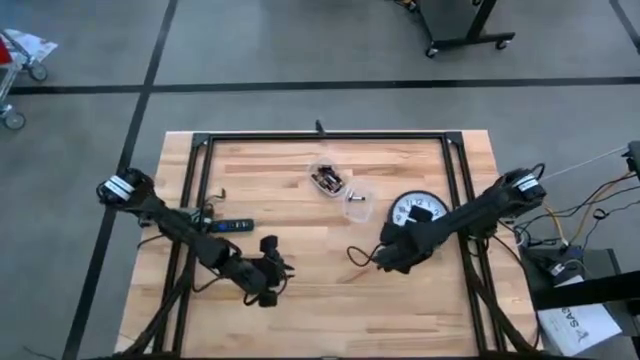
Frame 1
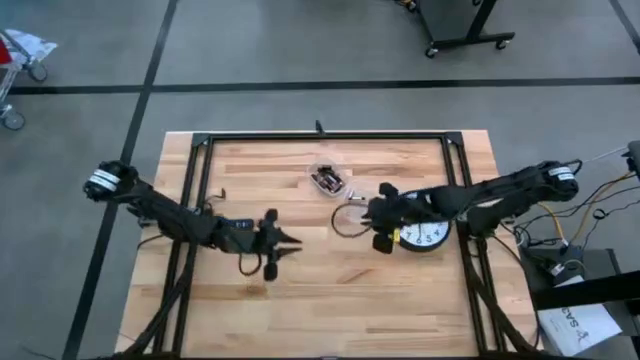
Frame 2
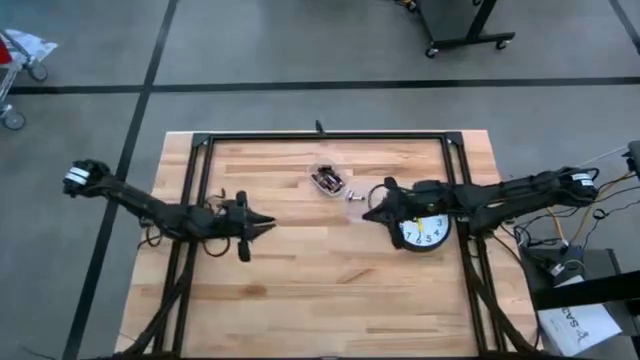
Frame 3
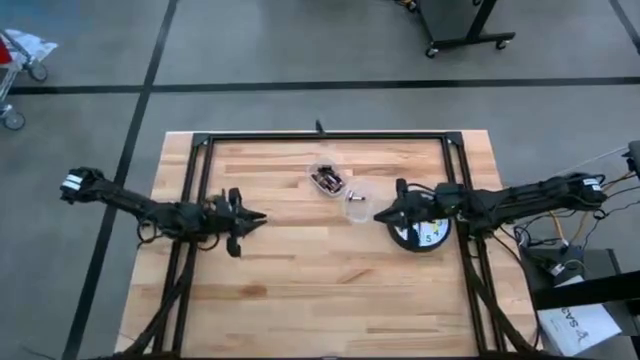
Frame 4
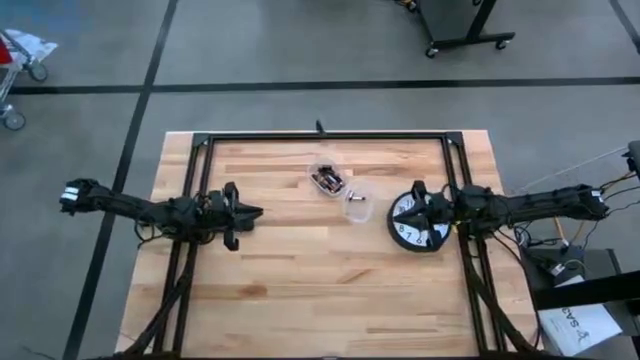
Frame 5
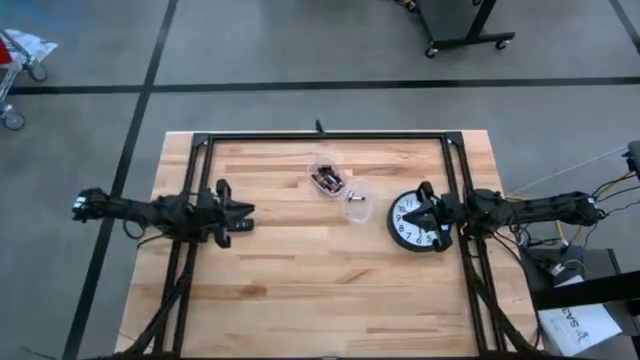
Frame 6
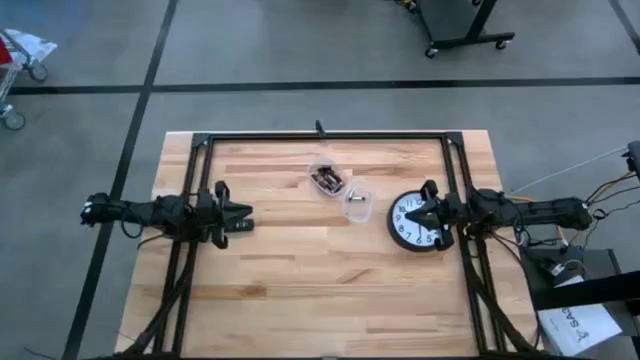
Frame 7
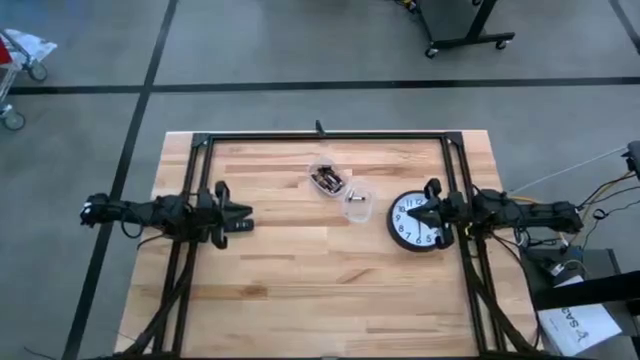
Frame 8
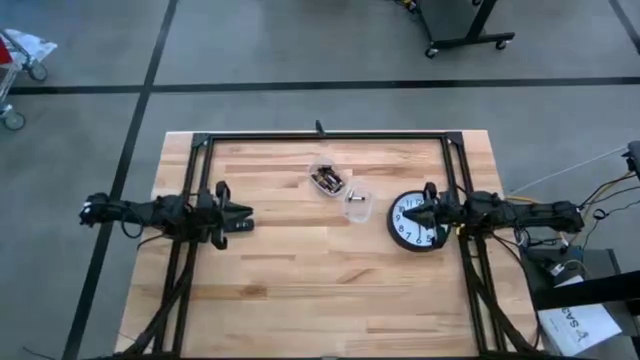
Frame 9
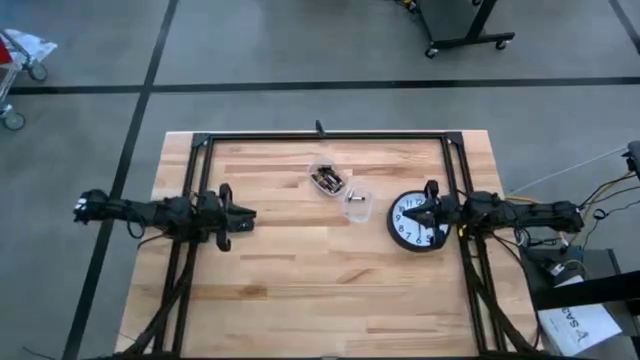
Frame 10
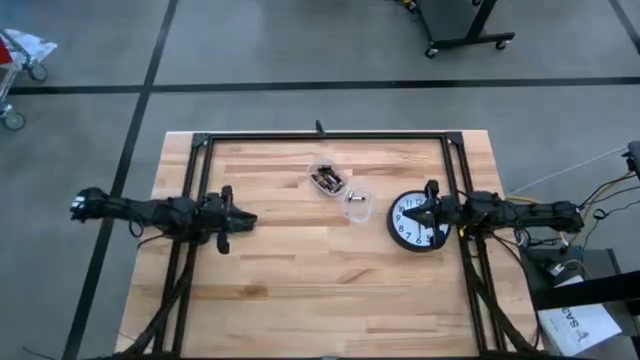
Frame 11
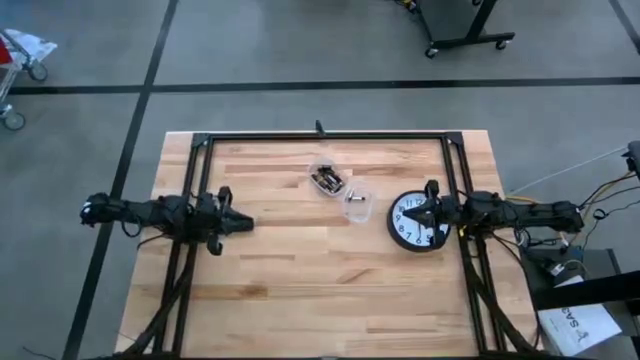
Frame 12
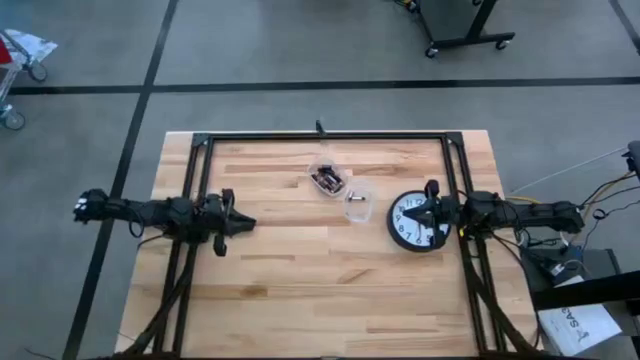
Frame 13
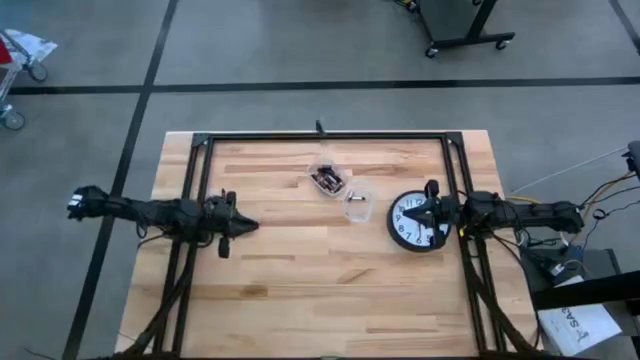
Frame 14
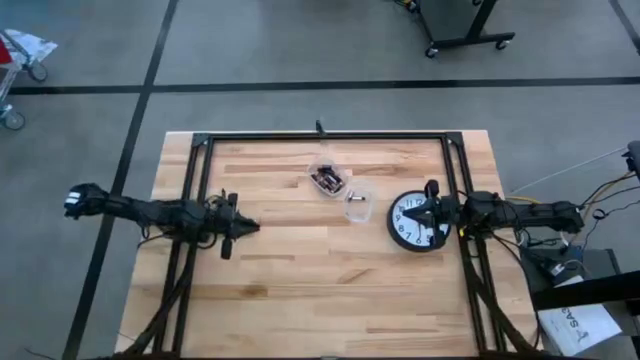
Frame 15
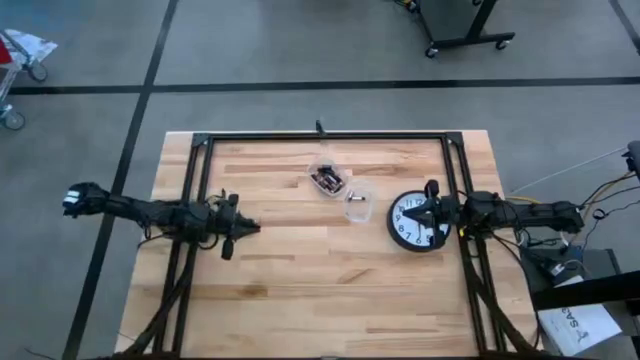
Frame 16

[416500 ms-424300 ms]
Task: Insert battery
Return to Home Position

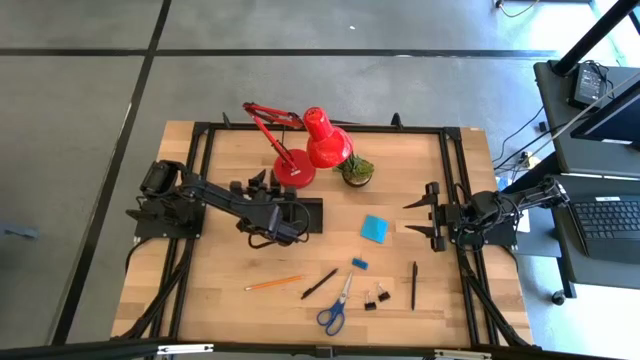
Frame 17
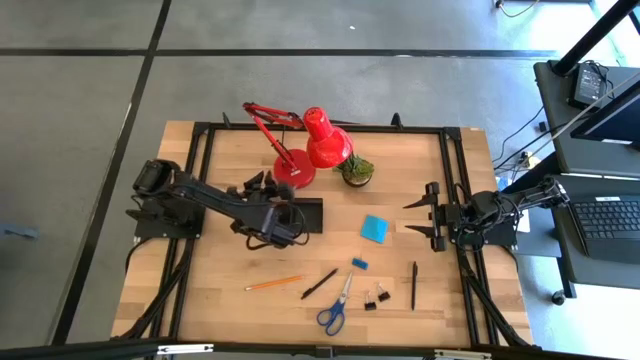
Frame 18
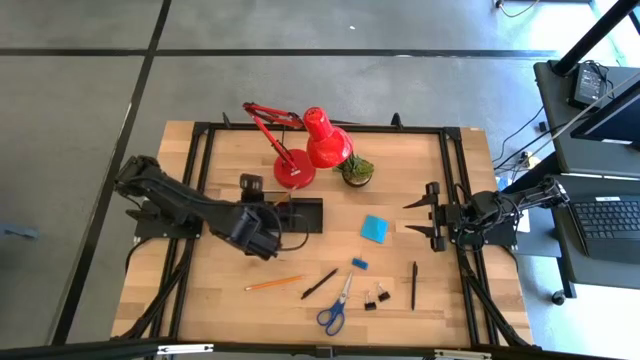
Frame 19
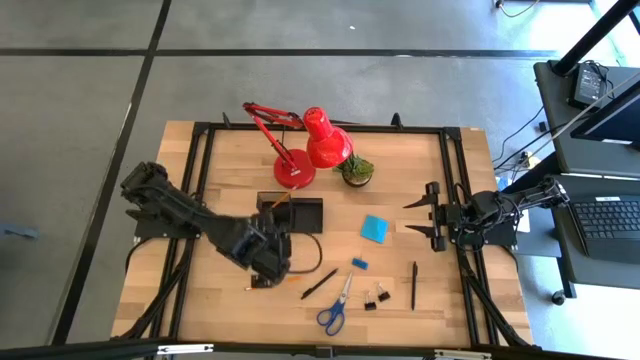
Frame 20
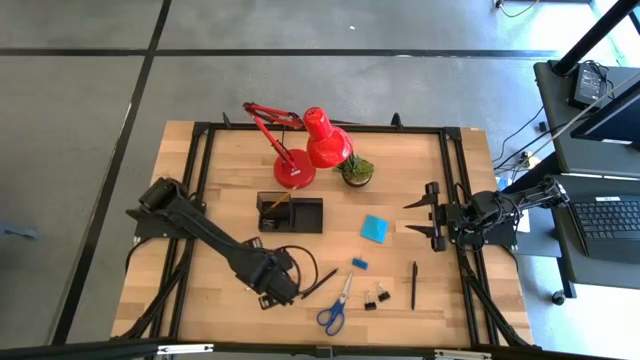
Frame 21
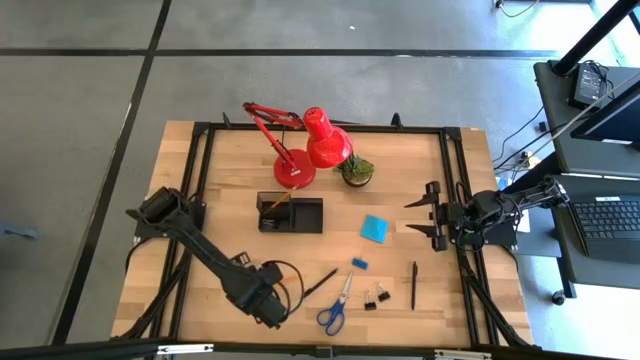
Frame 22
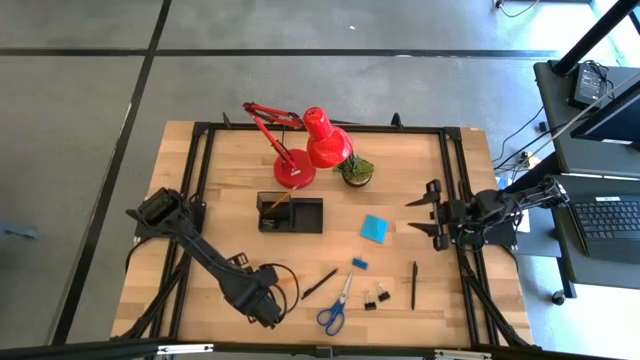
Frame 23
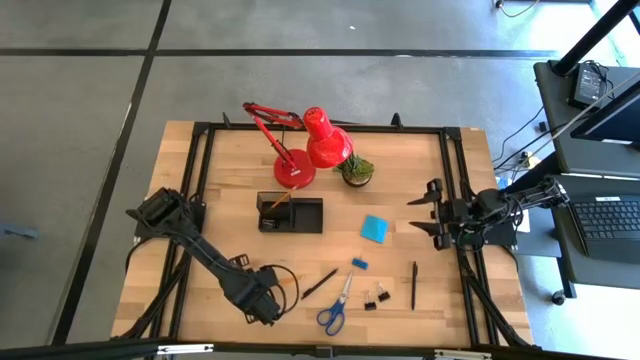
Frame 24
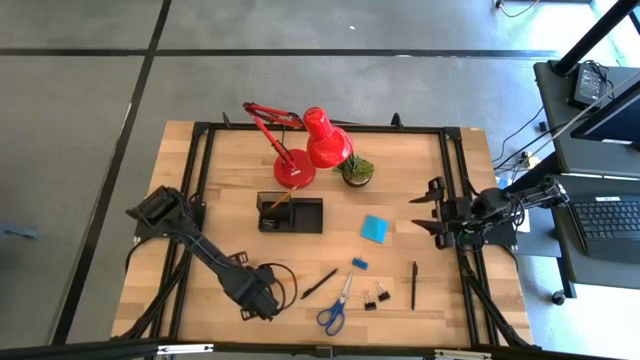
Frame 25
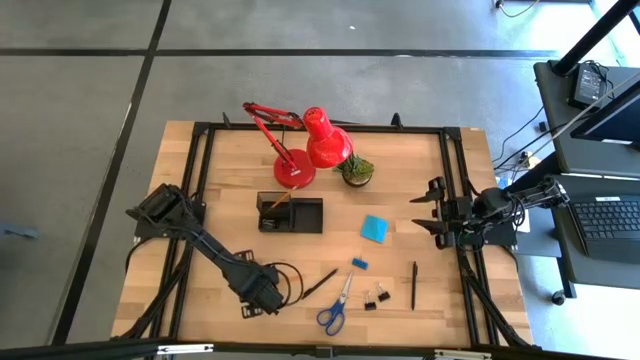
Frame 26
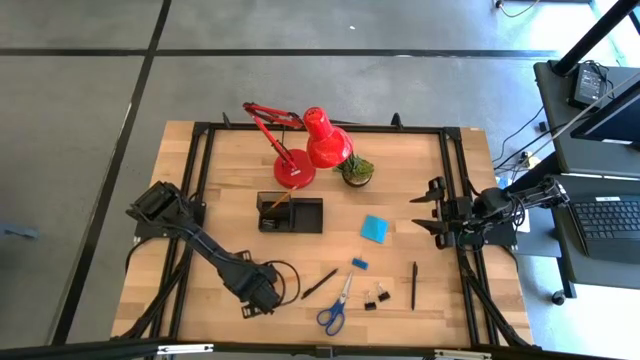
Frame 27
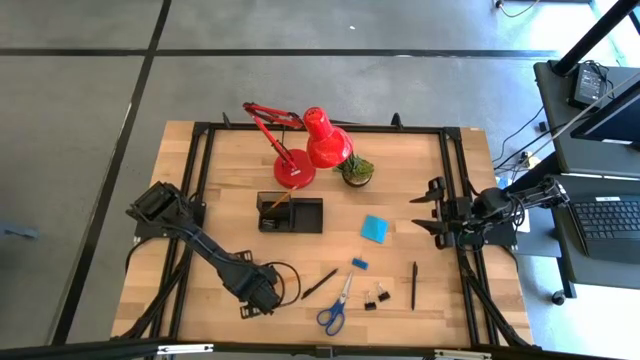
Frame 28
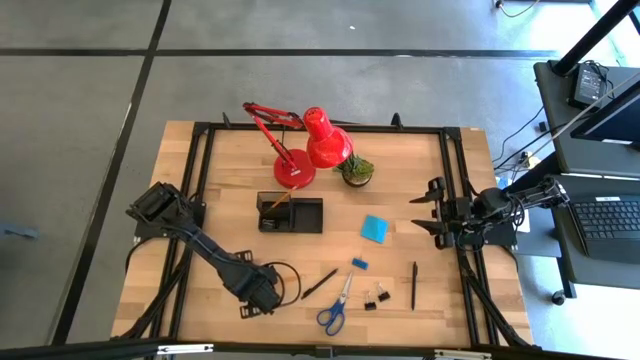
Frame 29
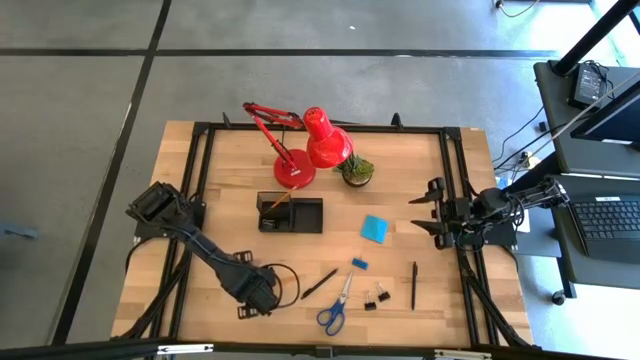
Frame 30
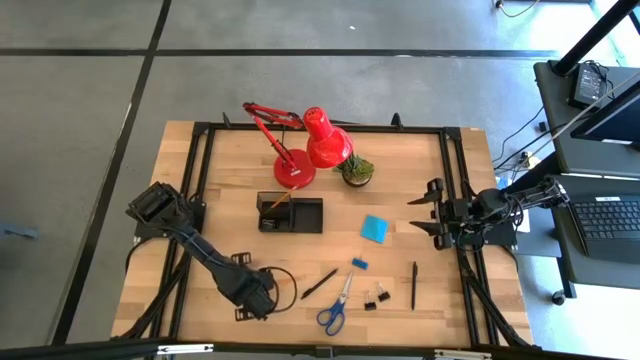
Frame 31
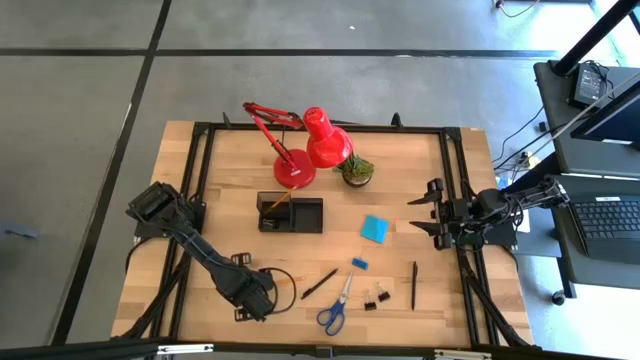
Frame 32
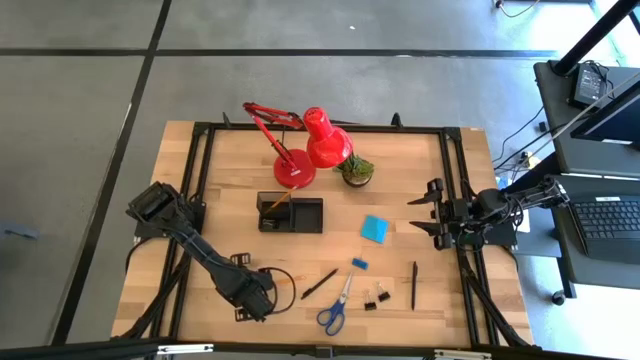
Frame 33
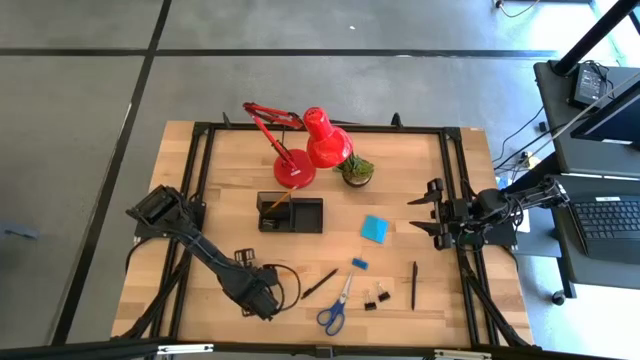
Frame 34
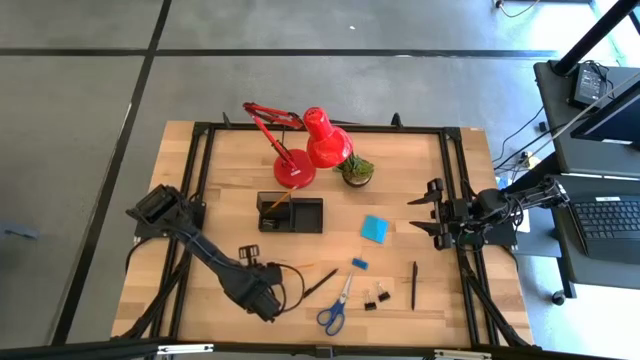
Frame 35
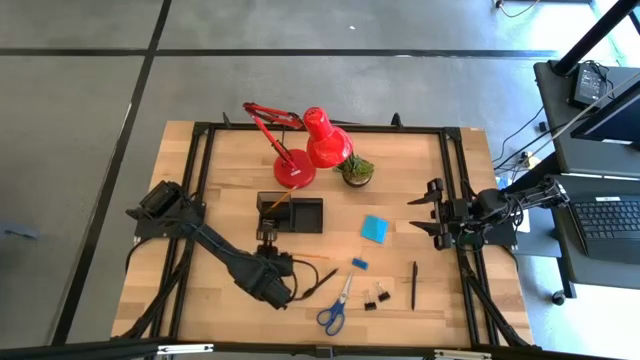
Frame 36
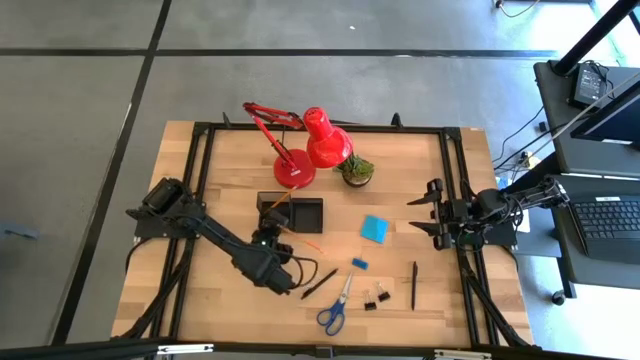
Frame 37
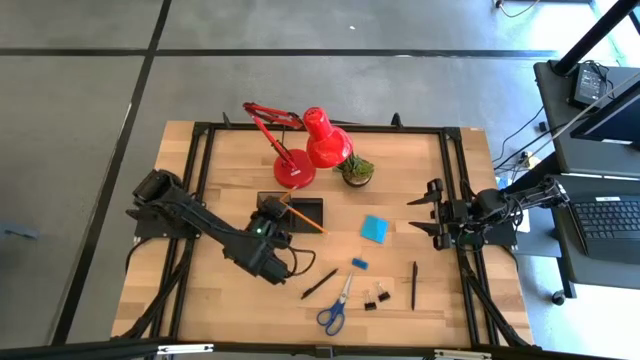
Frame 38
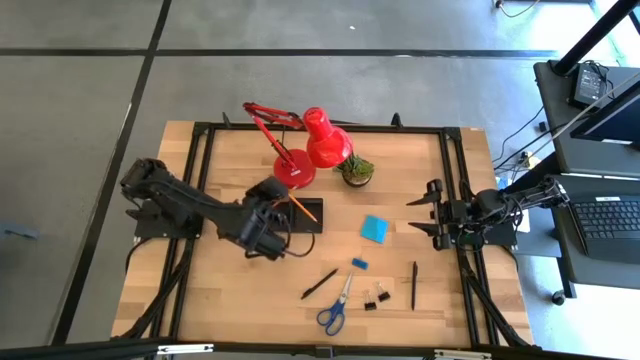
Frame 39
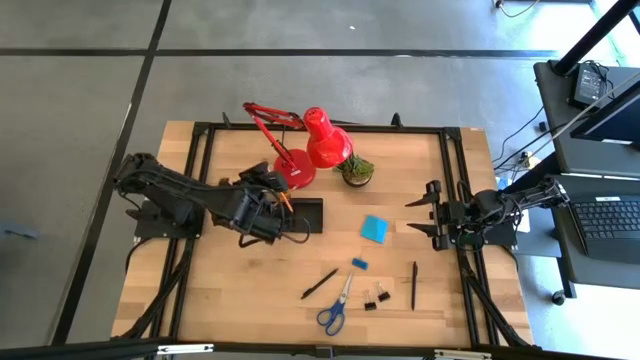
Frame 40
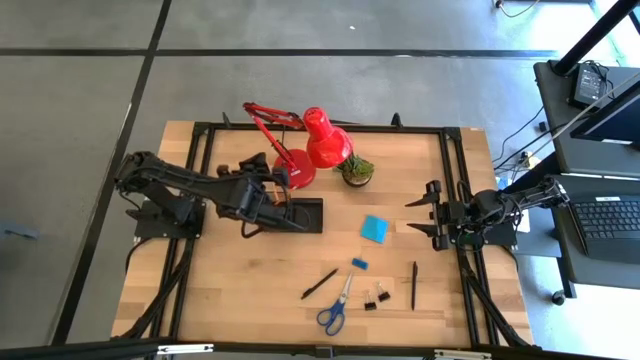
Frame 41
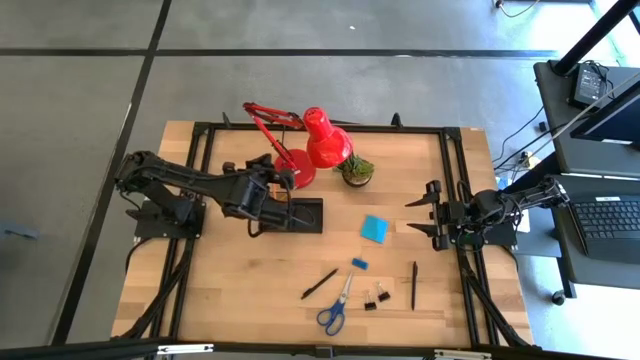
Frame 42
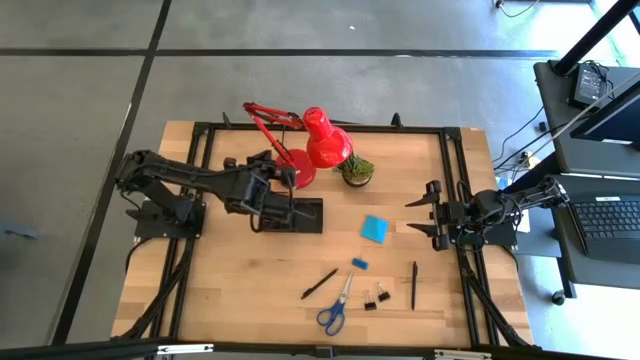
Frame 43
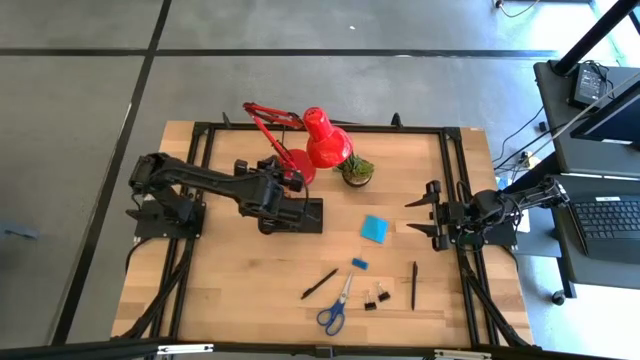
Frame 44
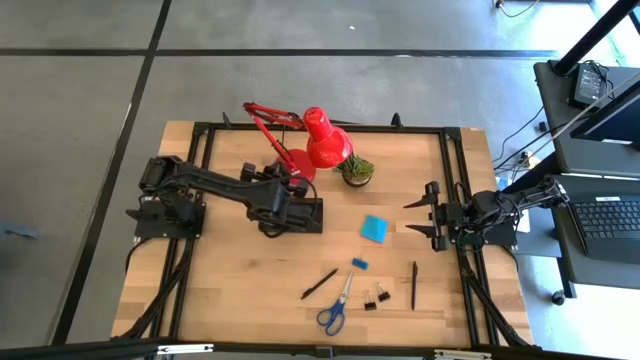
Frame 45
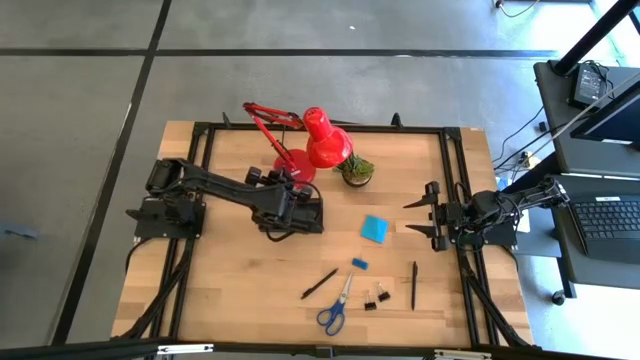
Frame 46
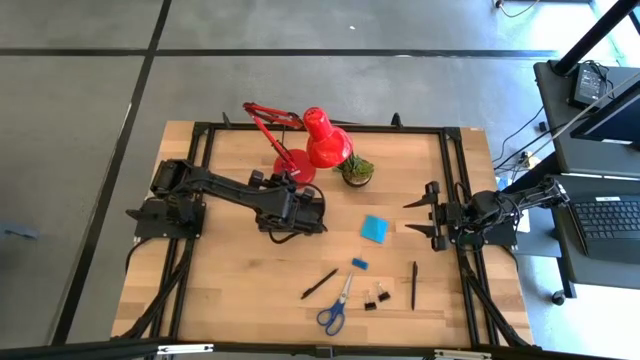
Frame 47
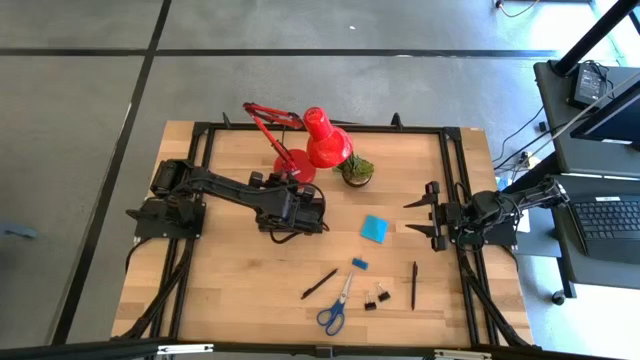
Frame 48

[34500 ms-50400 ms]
Task: Pick and place office supplies into organizer
Put the orange pencil into the black desk organizer
